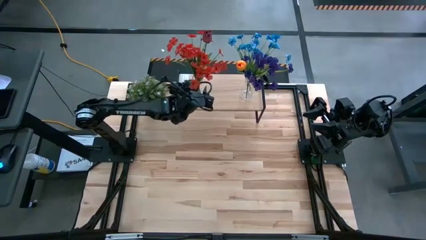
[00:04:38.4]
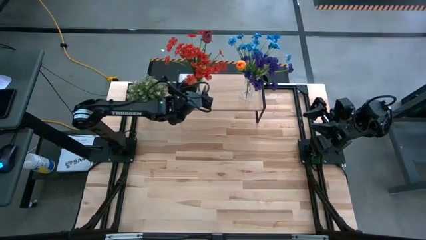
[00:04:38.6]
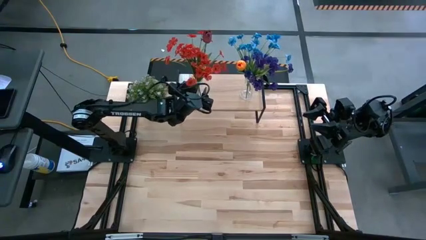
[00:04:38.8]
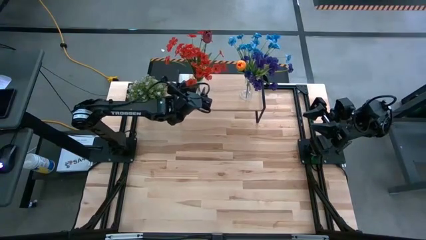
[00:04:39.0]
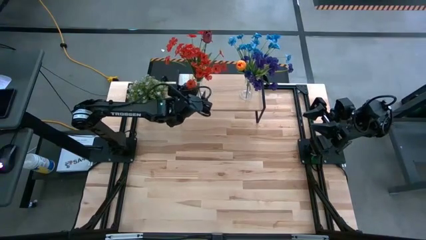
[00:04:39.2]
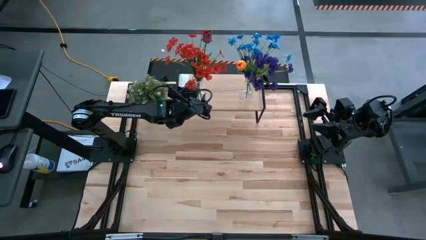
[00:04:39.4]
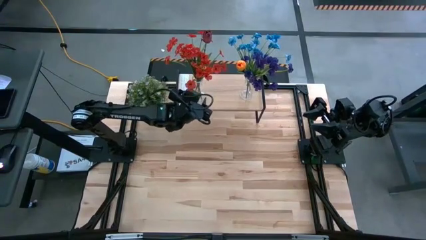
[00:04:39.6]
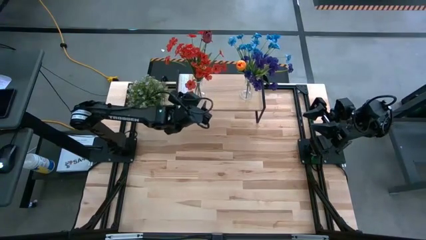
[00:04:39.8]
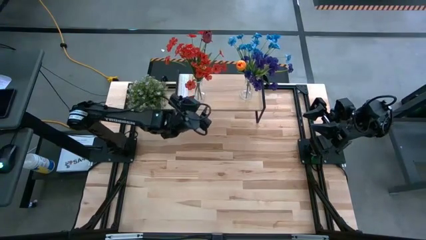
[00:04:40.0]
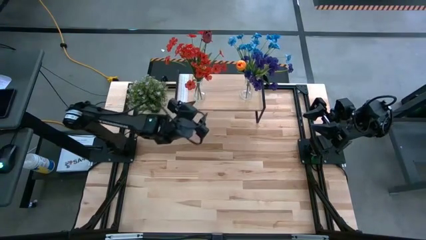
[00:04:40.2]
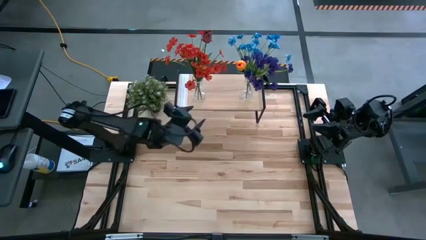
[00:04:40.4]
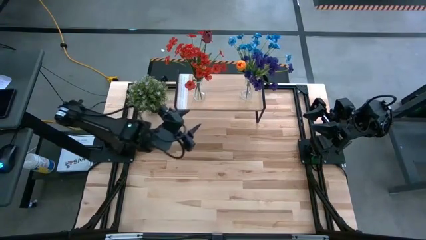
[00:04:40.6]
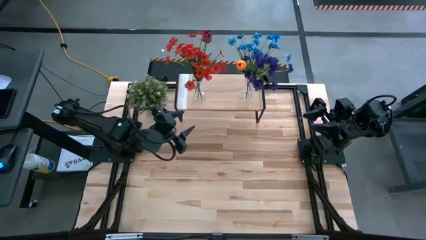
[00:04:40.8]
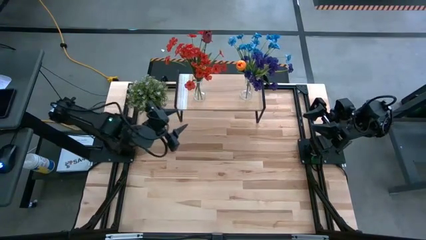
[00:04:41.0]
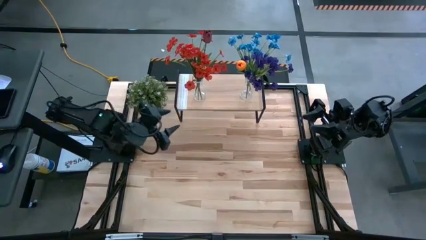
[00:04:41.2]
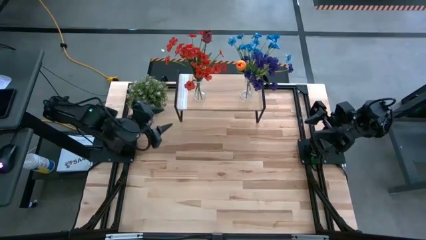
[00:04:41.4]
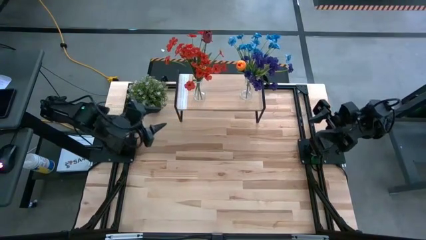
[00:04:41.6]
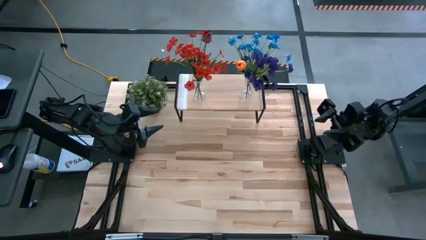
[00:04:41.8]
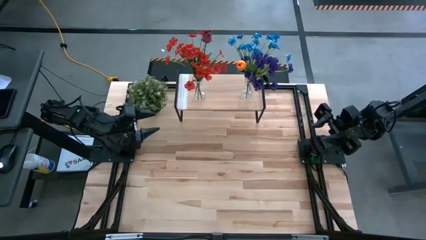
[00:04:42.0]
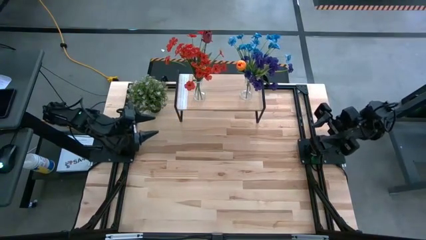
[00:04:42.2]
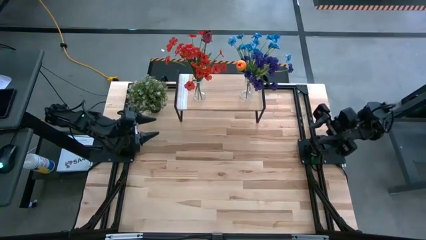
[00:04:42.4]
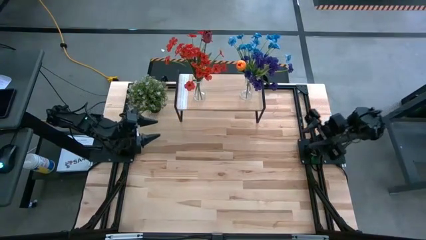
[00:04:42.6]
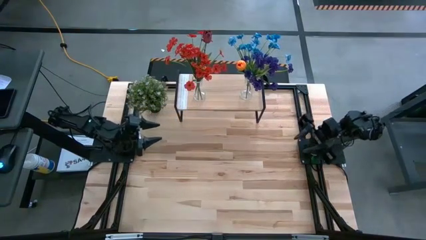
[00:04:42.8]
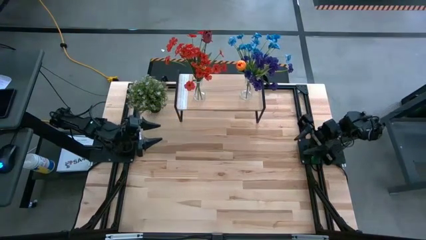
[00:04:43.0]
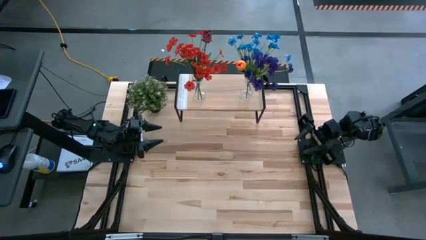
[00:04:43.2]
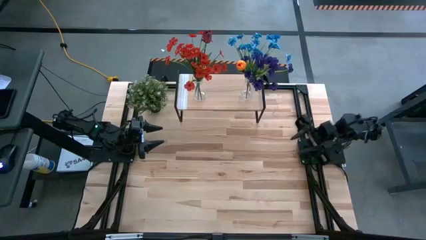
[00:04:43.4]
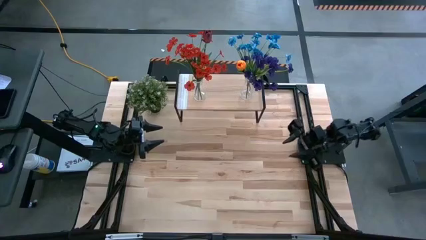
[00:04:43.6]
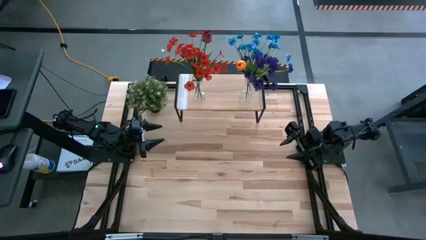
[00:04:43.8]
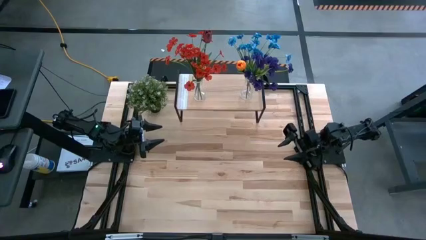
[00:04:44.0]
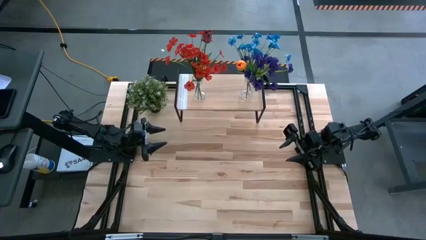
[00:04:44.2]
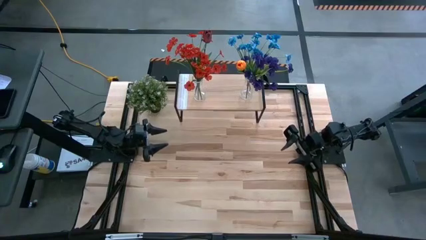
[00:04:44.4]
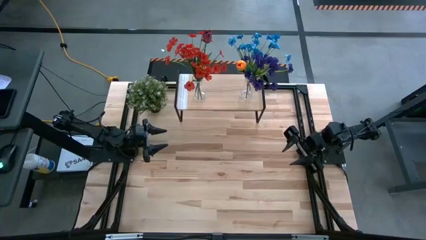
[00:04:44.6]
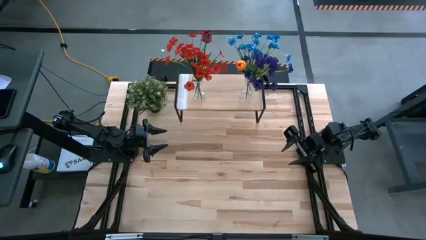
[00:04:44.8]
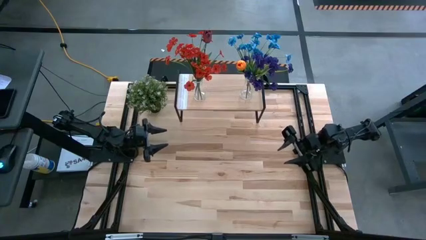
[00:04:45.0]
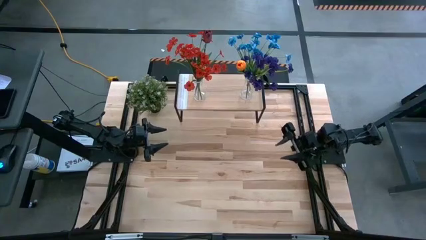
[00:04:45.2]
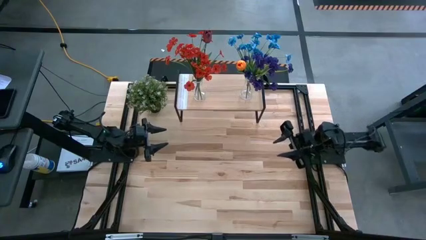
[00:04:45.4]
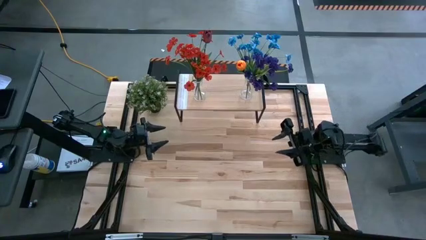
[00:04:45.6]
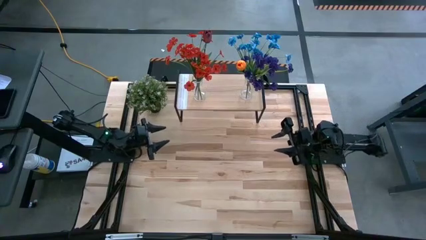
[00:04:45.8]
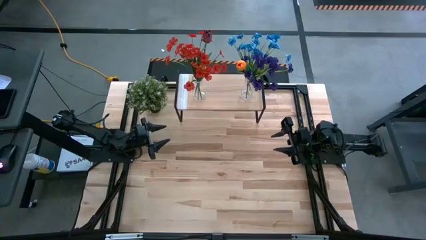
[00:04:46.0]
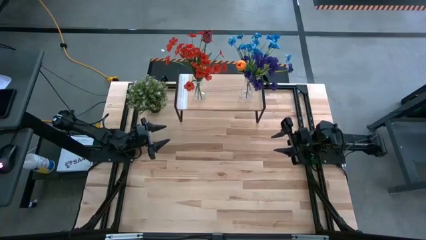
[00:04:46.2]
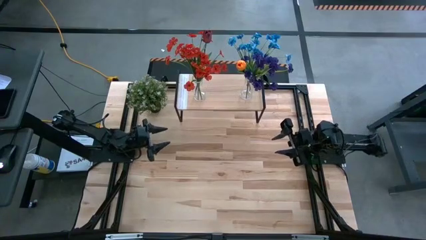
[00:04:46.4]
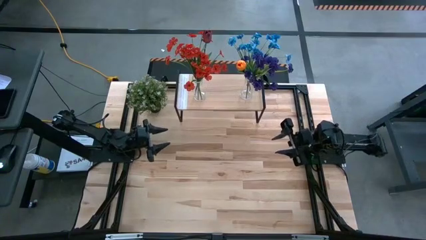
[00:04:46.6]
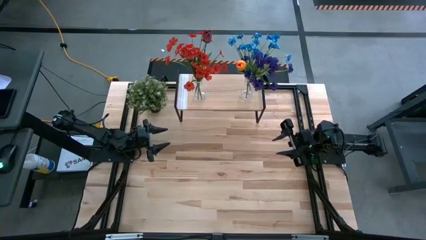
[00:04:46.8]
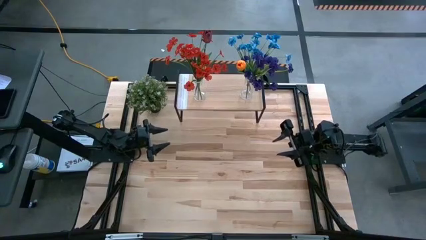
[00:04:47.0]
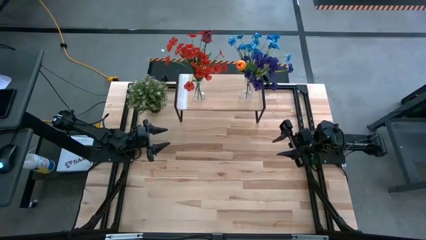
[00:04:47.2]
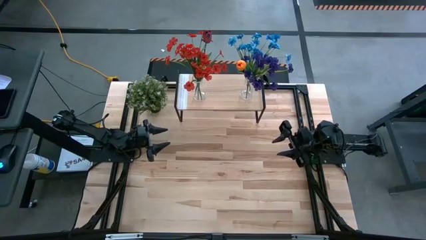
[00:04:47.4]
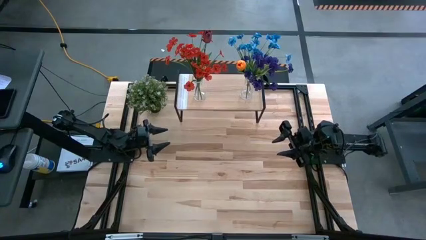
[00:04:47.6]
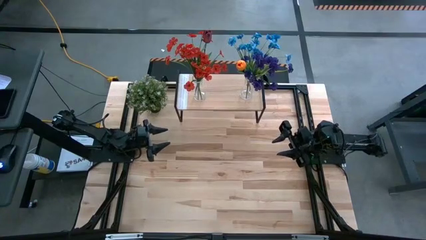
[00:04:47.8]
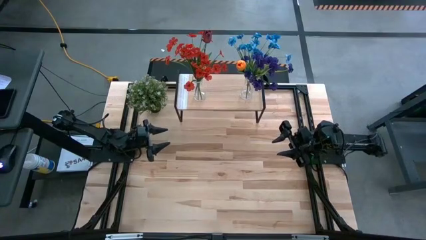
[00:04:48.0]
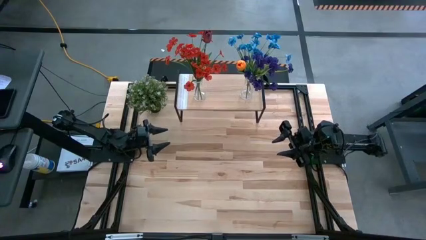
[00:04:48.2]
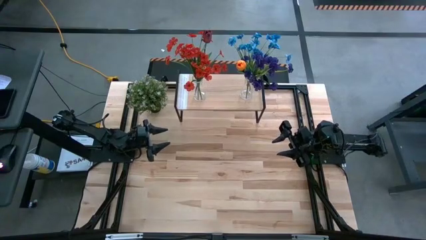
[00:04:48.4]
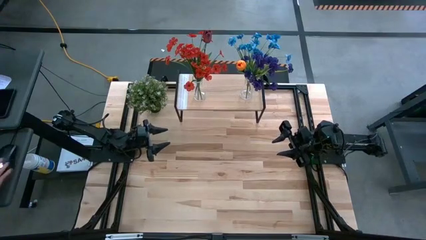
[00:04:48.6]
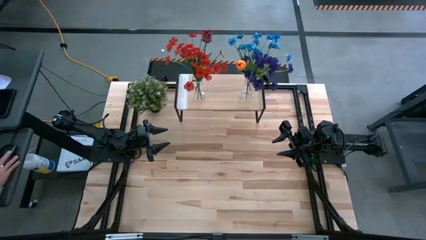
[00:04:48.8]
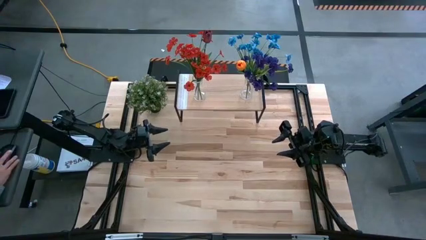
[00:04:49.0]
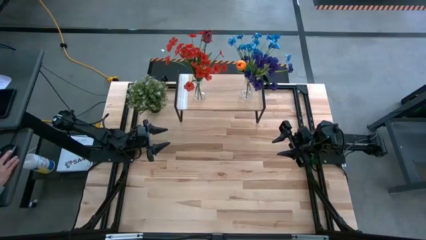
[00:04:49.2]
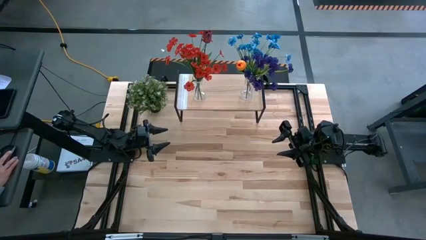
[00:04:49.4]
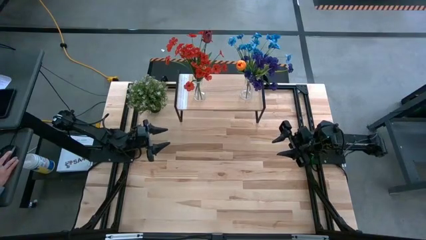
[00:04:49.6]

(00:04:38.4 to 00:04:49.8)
Task: Pick and place flowers into a vace then onto a shelf
Return to Home Position
